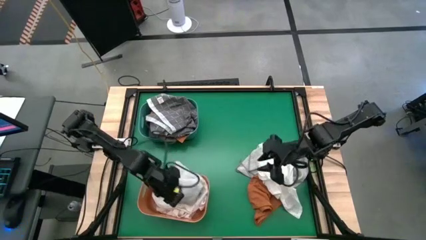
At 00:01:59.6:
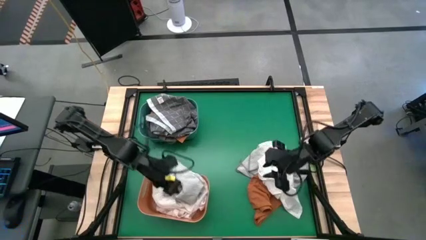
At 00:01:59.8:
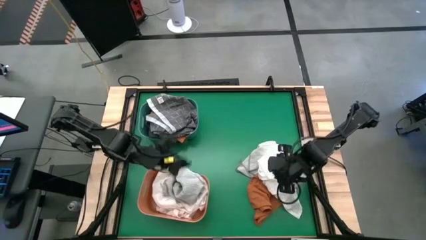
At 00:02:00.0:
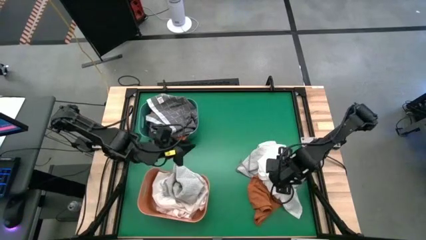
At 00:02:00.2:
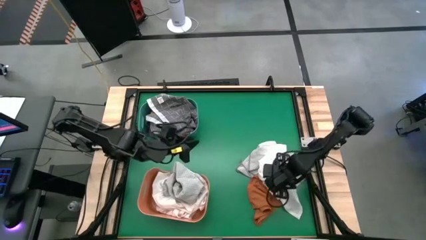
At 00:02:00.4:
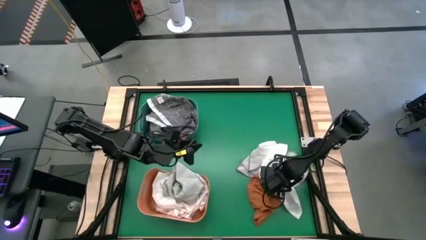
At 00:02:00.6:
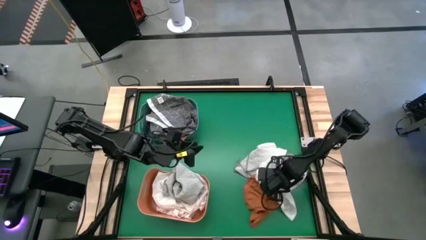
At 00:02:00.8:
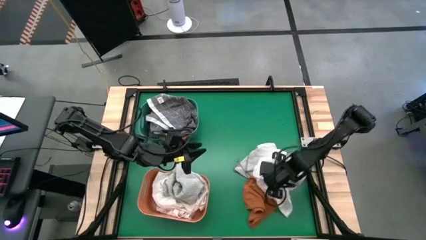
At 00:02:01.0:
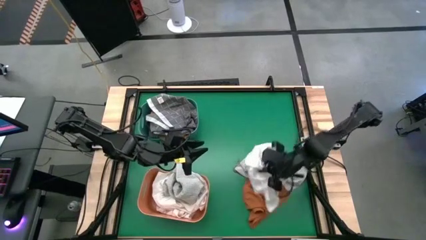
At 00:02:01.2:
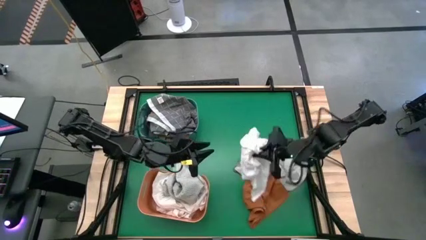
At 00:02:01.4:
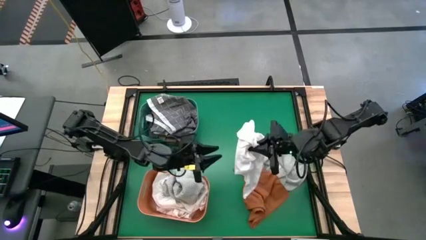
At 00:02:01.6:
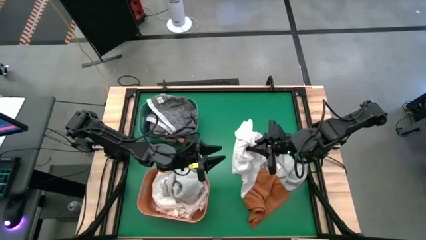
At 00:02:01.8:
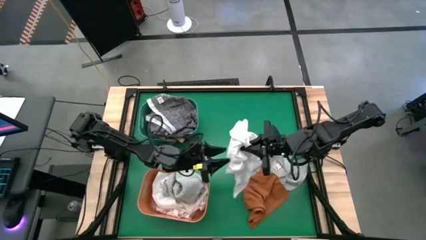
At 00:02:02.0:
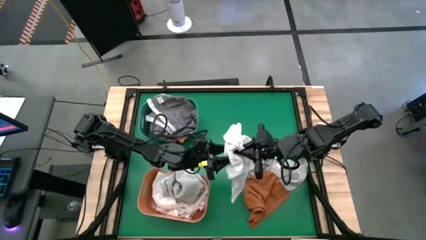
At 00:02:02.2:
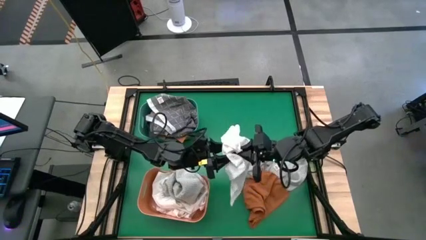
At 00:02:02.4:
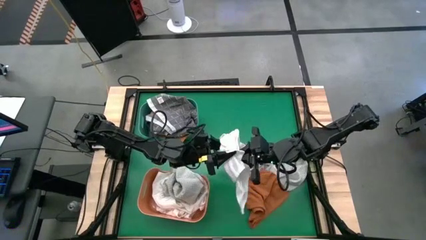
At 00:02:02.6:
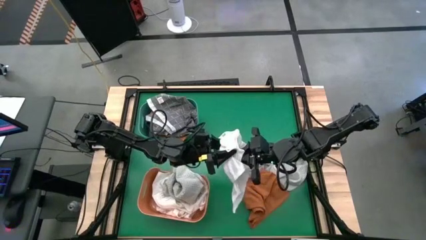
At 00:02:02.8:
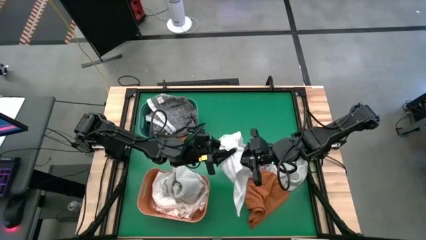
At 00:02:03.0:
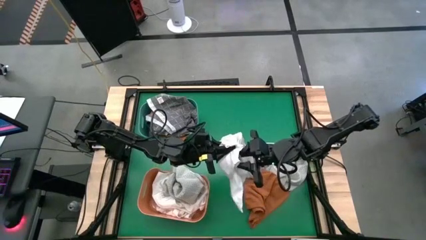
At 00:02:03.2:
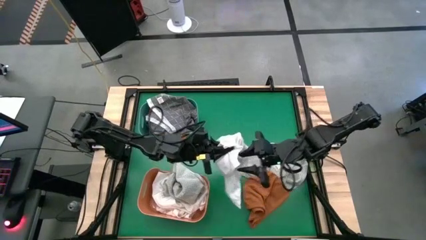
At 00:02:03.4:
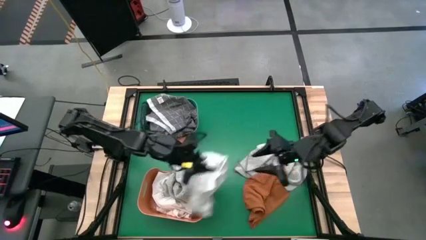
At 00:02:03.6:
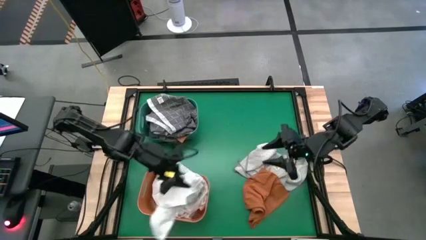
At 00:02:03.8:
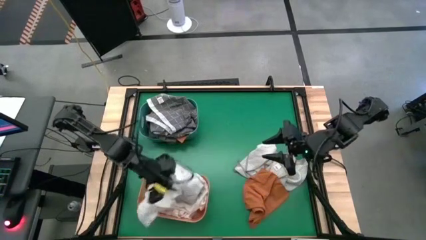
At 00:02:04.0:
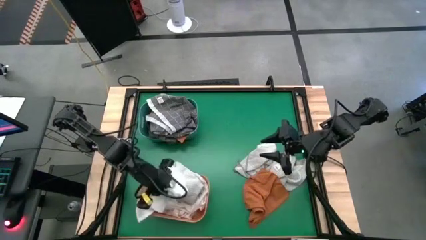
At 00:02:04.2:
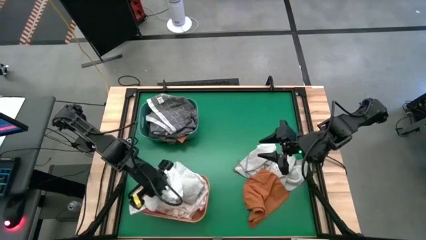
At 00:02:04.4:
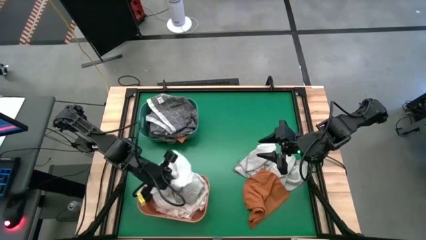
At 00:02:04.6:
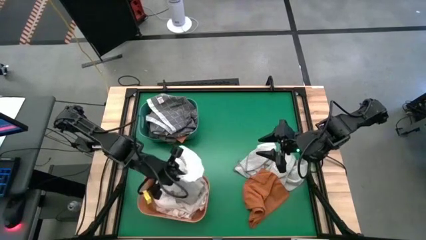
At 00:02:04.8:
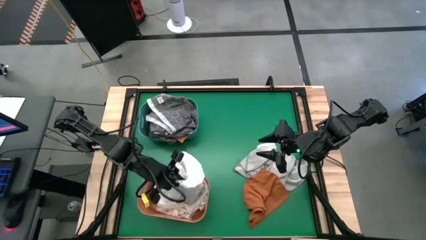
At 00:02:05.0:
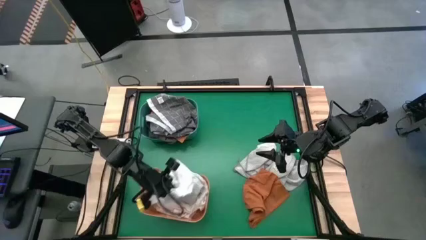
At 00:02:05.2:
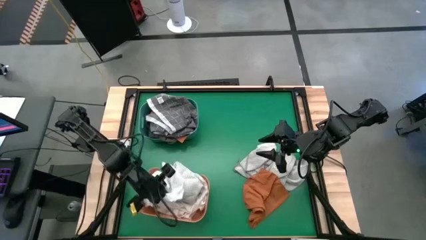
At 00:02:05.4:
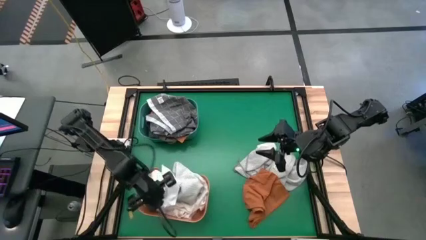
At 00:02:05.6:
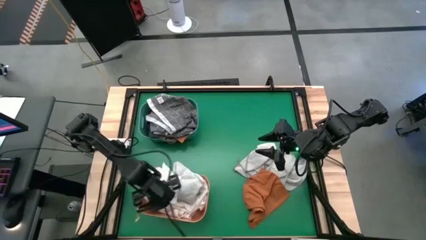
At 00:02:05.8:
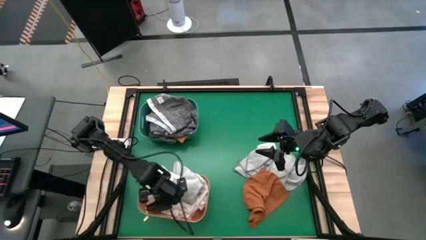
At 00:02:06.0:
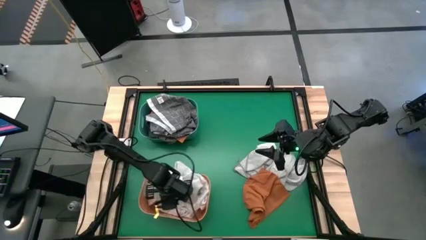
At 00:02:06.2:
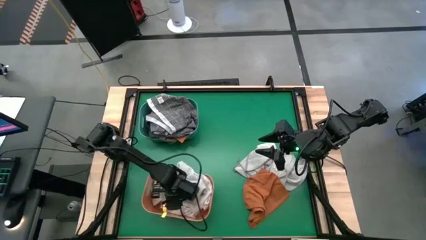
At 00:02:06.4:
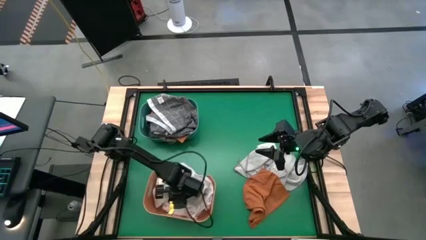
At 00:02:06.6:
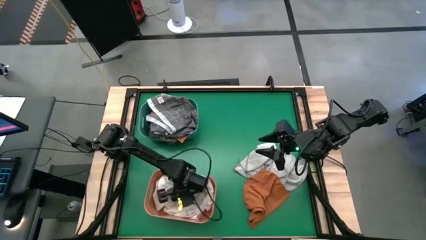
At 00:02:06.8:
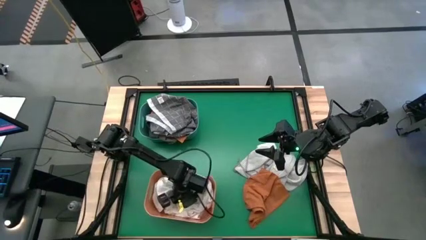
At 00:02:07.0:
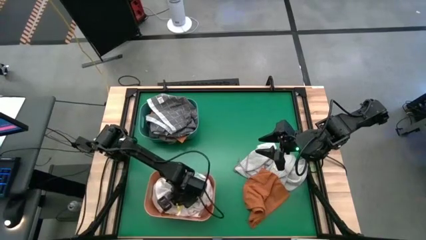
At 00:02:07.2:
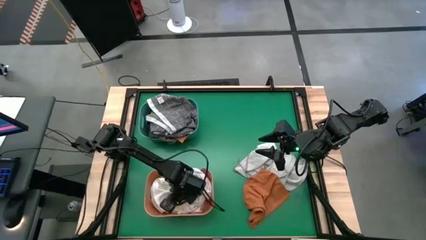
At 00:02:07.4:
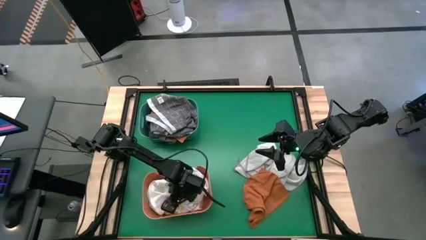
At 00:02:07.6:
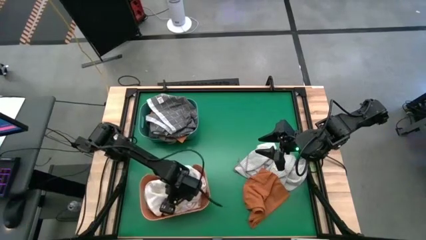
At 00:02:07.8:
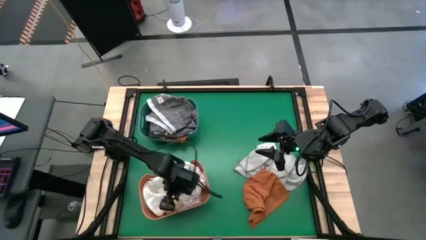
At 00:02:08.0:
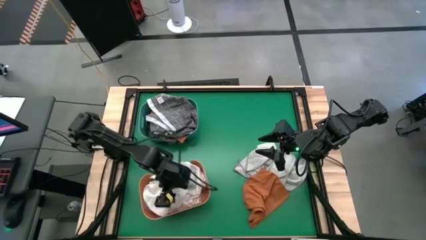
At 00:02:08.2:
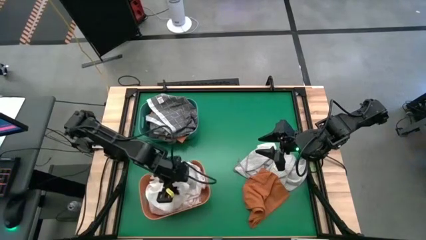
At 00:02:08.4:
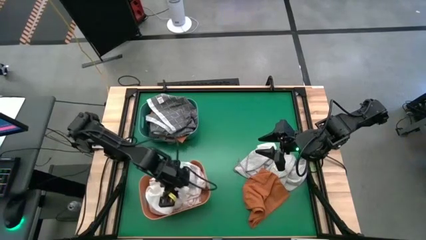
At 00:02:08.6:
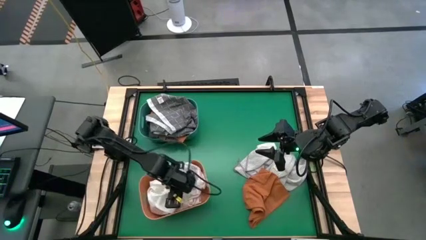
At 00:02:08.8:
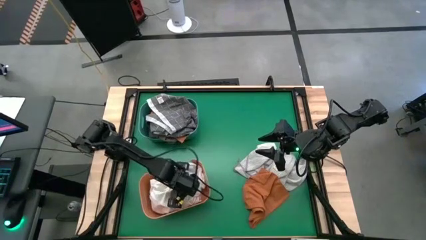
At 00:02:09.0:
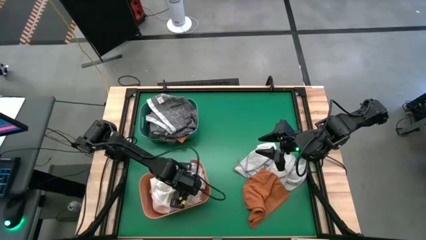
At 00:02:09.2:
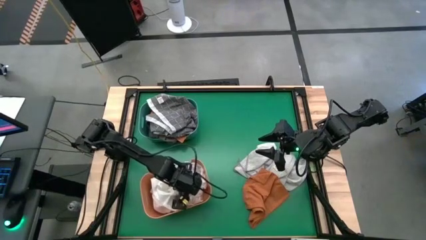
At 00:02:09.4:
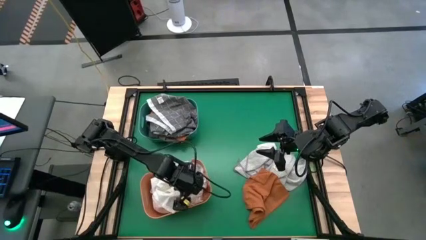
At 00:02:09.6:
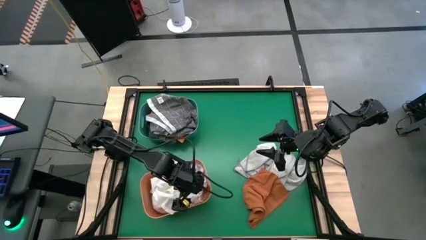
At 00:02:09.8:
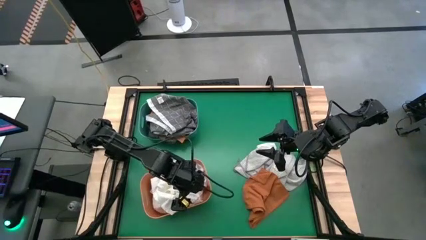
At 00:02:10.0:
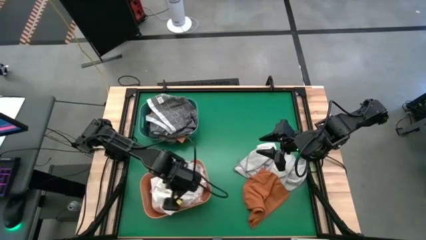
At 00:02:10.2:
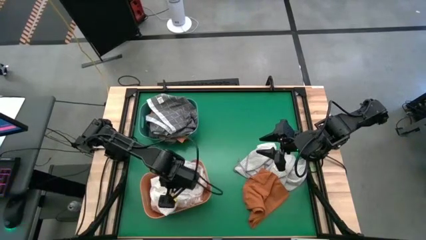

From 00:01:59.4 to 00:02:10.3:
Task: Sort microfiber towel by color & place in baskets
Put the white microfiber towel into the orange bin

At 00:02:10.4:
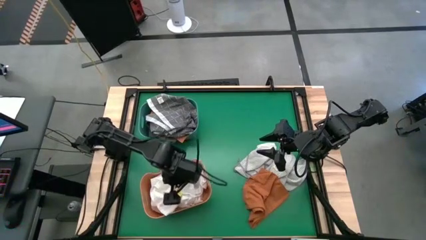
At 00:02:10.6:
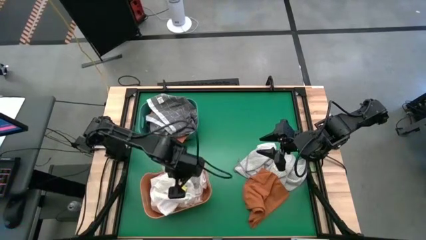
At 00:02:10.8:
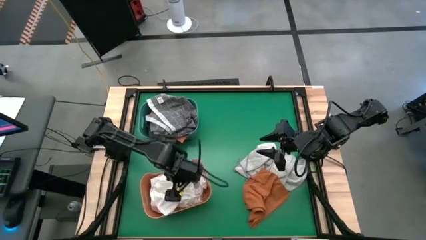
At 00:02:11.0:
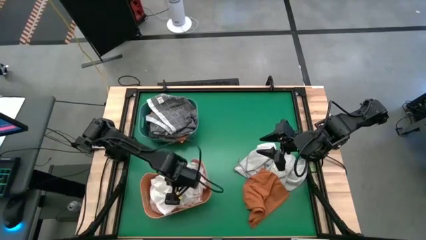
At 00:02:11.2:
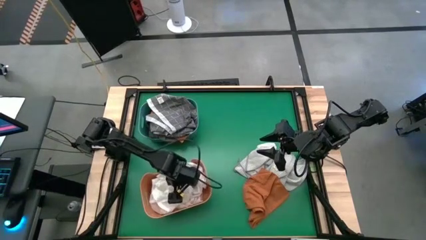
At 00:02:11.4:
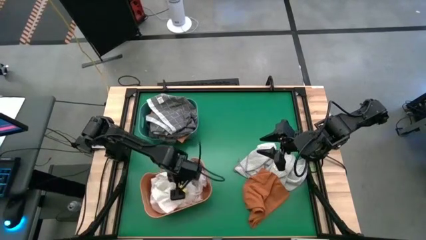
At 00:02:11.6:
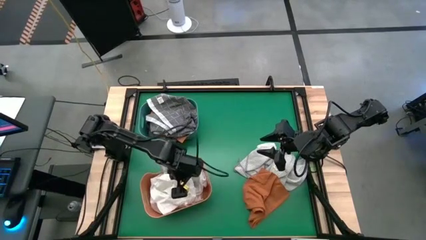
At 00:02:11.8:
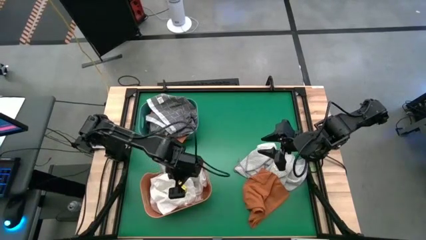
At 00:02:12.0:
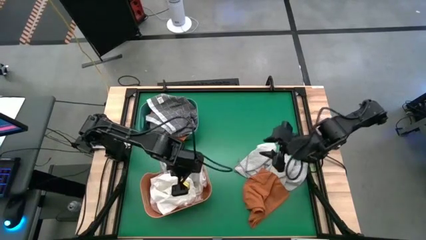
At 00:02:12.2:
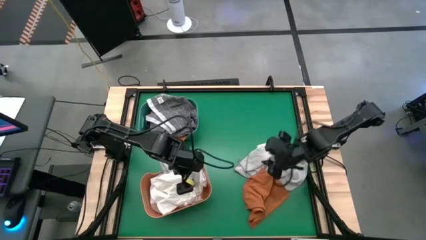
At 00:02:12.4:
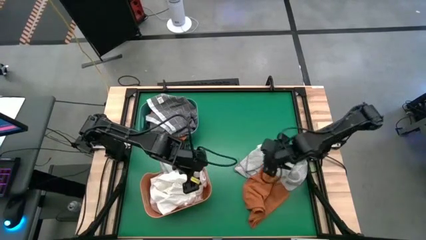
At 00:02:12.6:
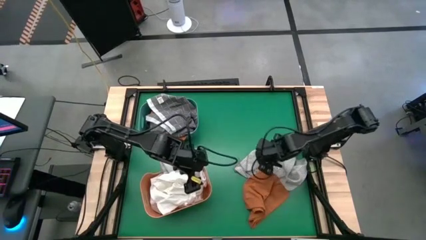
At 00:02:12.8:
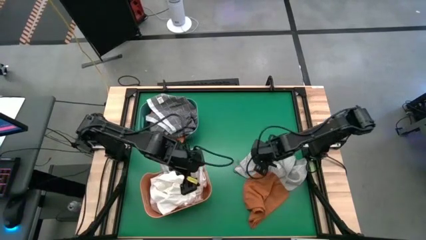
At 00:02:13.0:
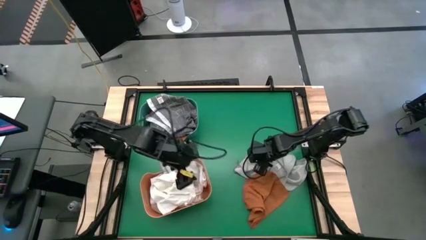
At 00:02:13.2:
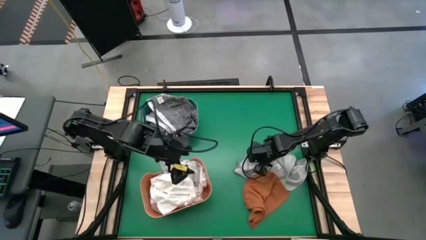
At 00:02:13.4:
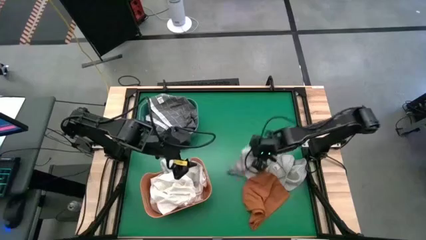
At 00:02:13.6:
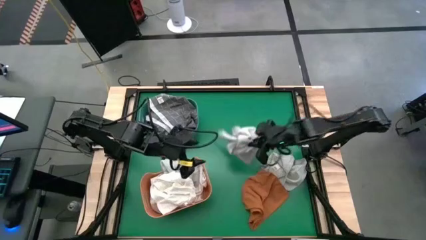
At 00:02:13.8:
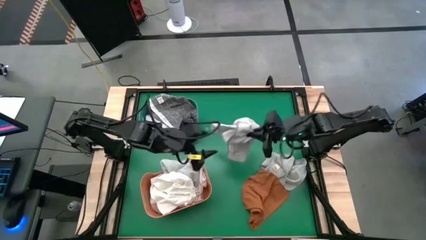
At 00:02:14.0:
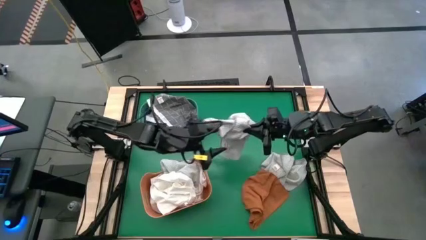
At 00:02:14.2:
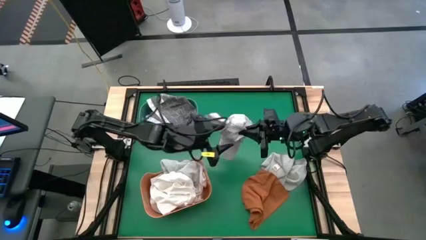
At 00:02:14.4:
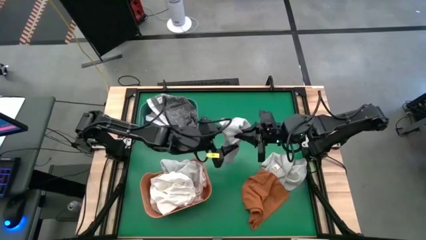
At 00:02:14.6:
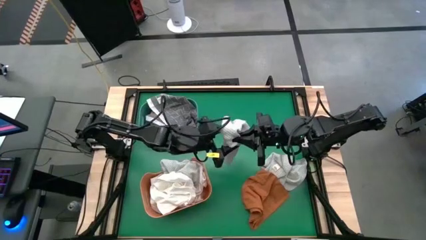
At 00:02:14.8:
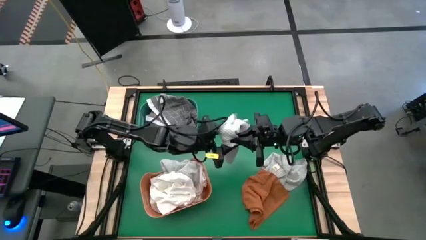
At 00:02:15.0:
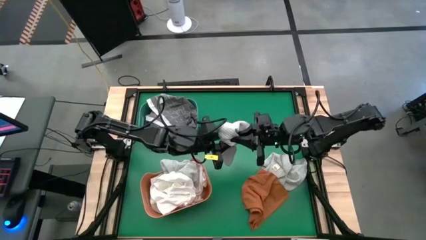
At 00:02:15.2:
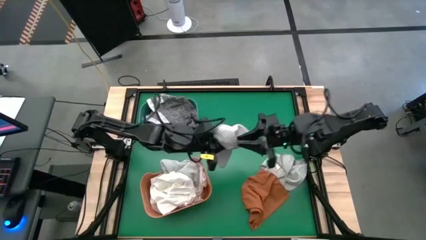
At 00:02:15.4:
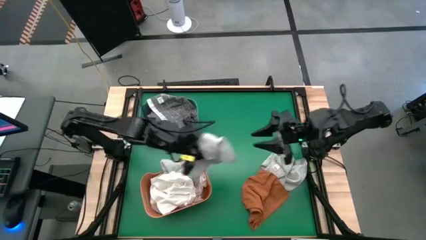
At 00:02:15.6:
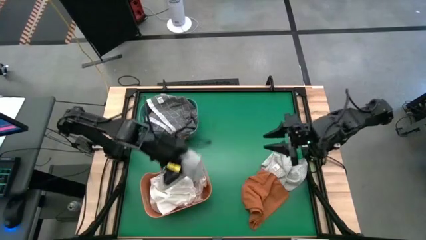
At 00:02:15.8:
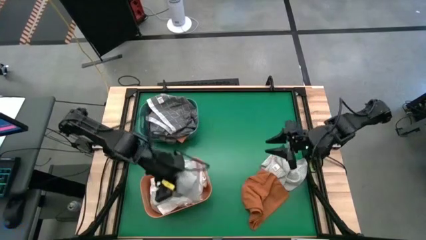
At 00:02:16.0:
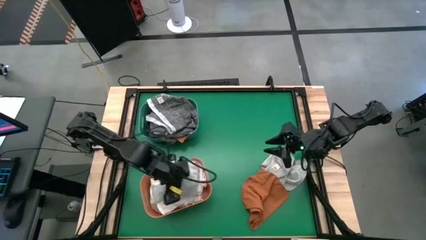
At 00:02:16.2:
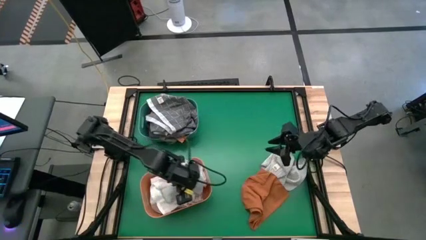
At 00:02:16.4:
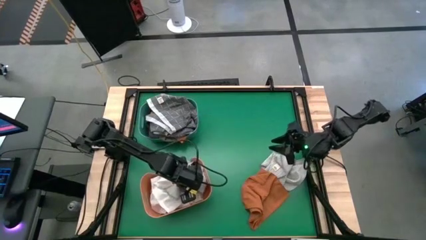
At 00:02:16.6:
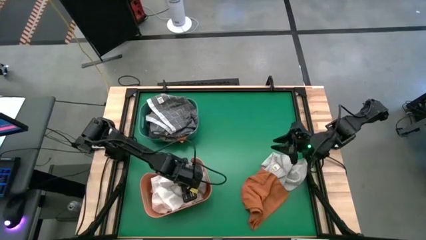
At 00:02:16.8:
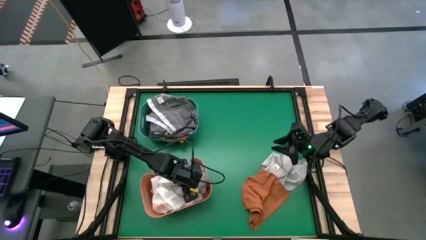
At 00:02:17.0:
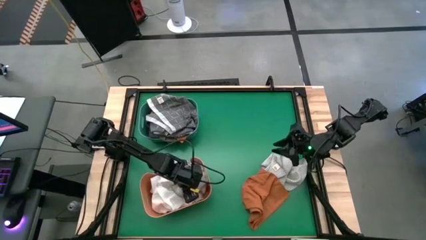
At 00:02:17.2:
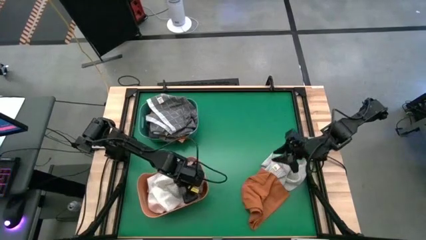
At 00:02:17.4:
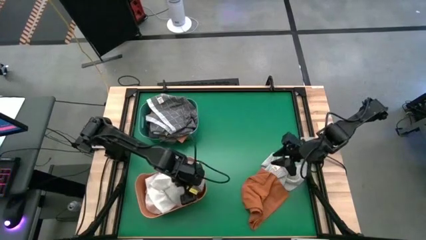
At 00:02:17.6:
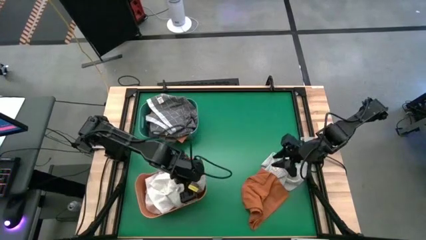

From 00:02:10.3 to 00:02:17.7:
Put the gray microfiber towel into the orange bin
